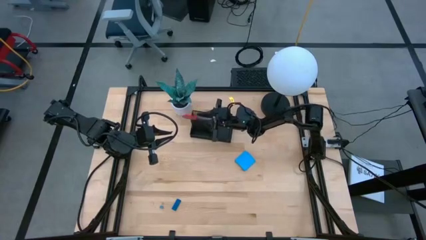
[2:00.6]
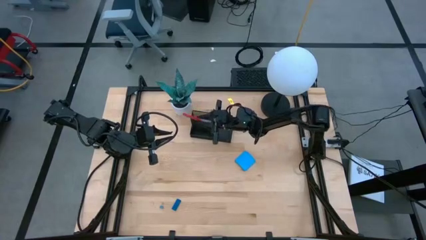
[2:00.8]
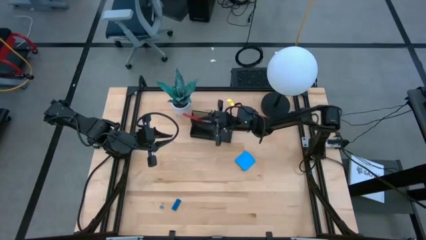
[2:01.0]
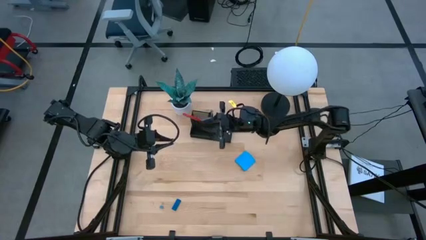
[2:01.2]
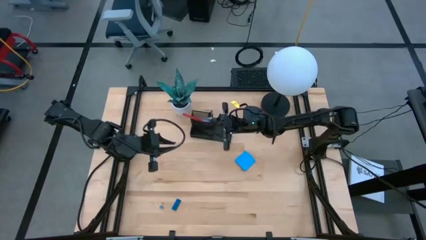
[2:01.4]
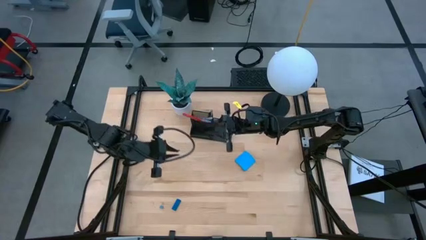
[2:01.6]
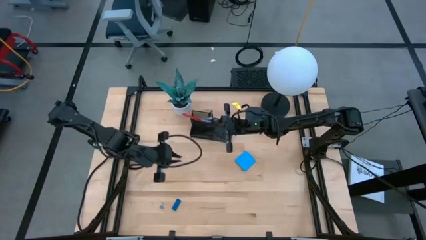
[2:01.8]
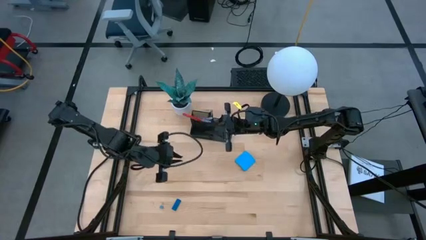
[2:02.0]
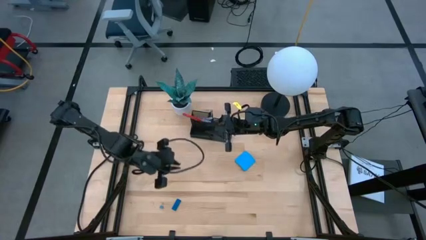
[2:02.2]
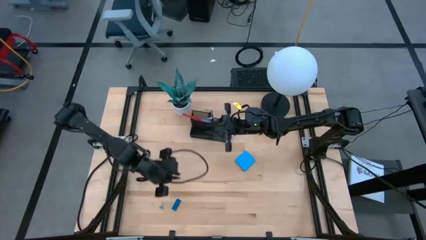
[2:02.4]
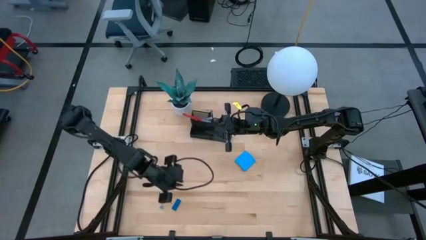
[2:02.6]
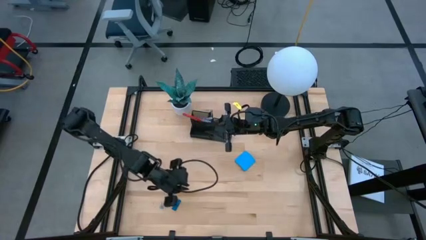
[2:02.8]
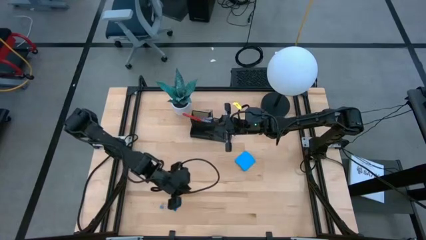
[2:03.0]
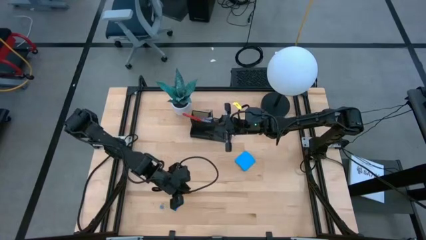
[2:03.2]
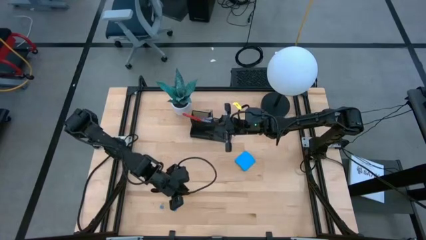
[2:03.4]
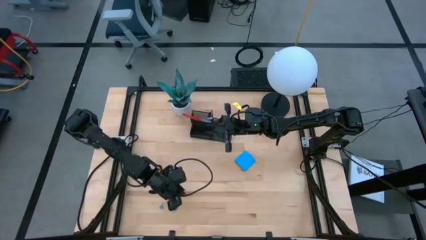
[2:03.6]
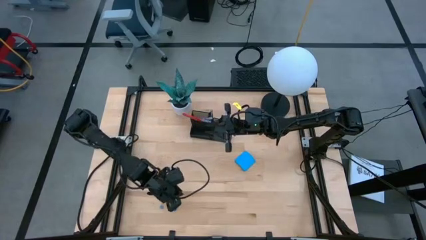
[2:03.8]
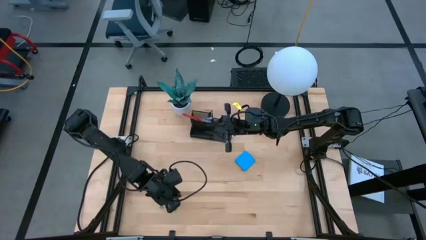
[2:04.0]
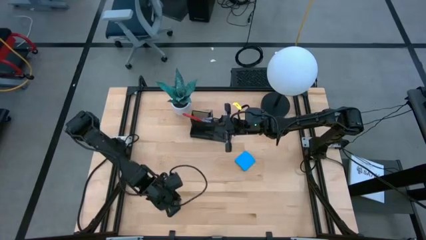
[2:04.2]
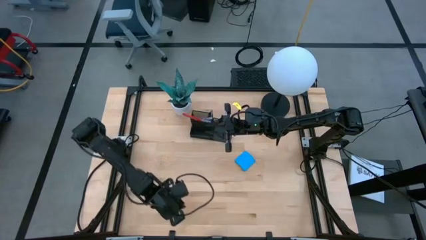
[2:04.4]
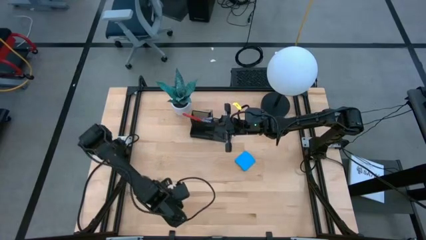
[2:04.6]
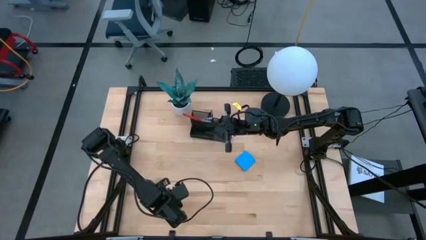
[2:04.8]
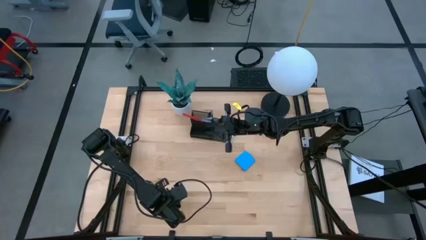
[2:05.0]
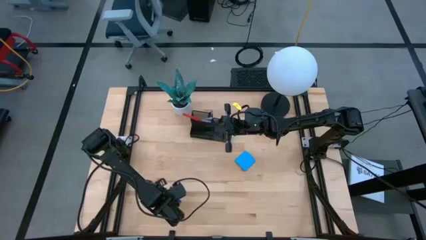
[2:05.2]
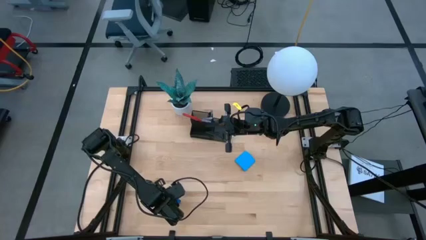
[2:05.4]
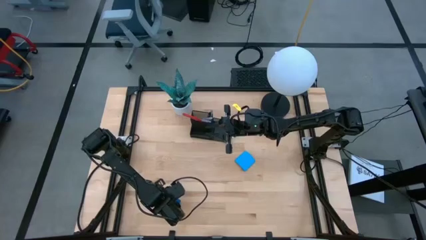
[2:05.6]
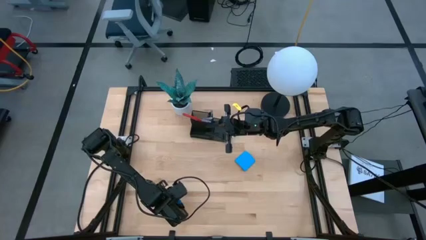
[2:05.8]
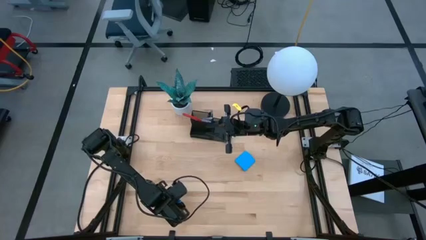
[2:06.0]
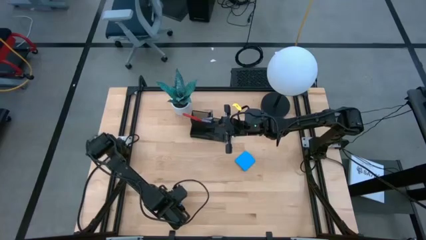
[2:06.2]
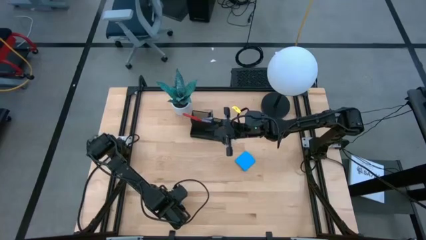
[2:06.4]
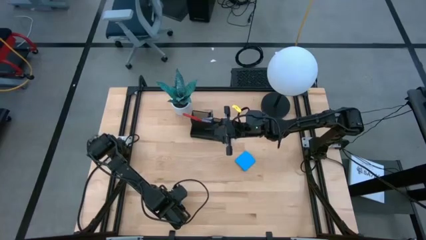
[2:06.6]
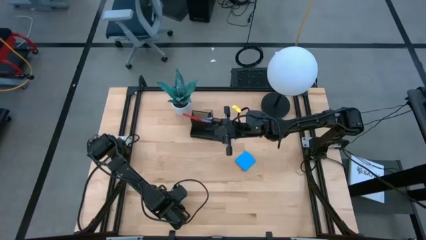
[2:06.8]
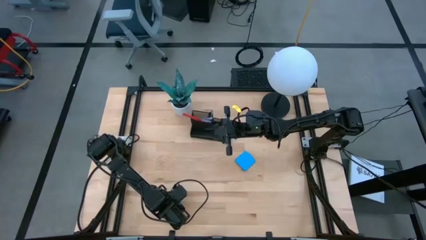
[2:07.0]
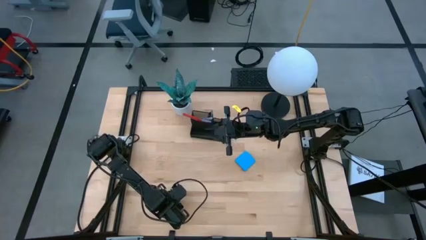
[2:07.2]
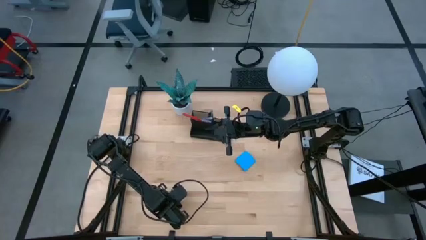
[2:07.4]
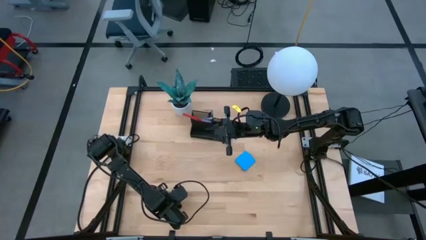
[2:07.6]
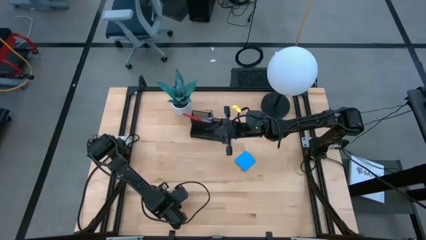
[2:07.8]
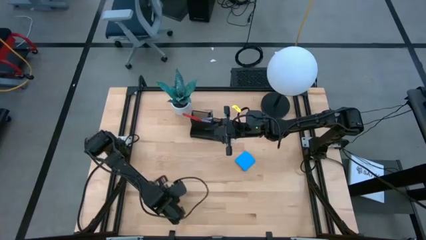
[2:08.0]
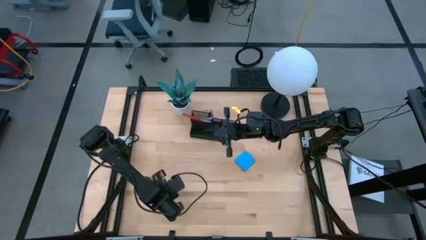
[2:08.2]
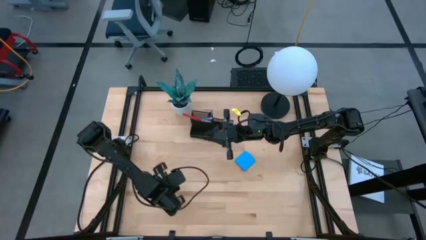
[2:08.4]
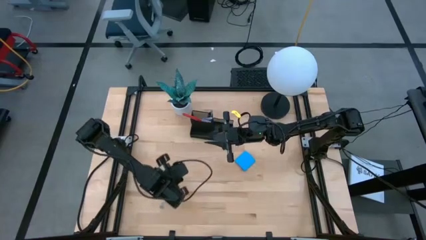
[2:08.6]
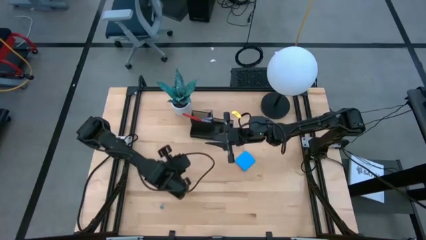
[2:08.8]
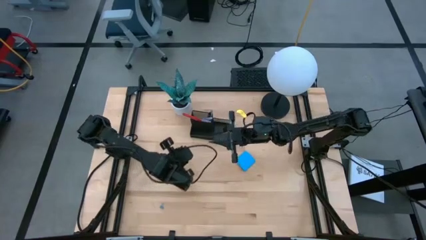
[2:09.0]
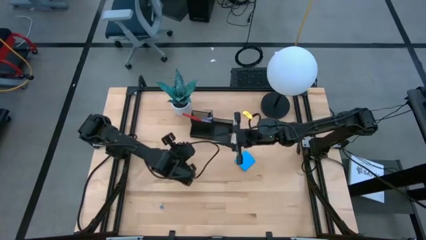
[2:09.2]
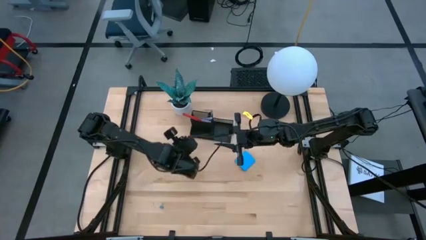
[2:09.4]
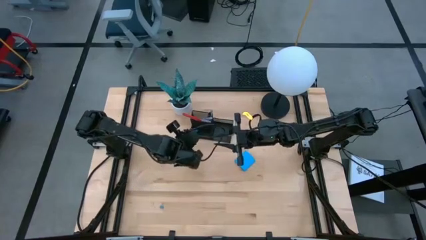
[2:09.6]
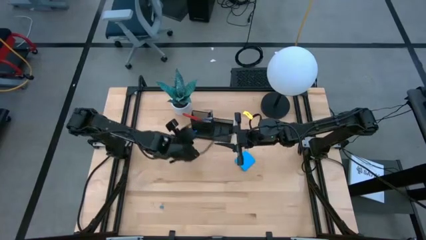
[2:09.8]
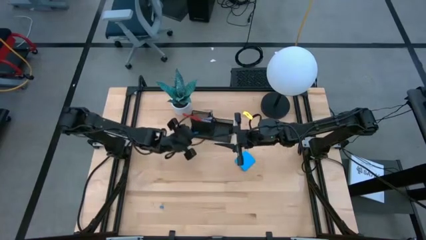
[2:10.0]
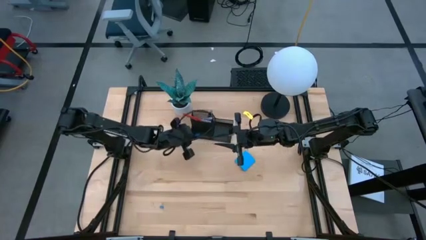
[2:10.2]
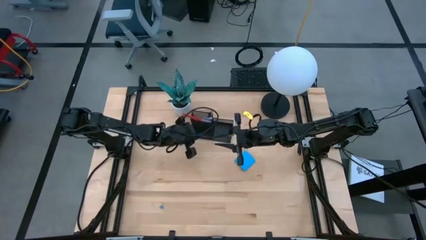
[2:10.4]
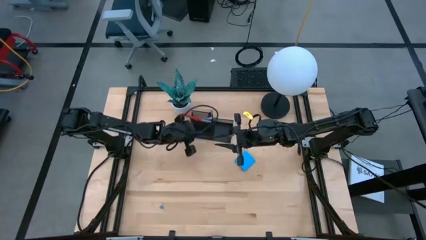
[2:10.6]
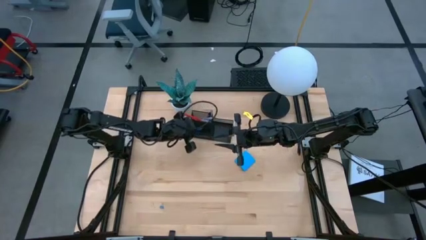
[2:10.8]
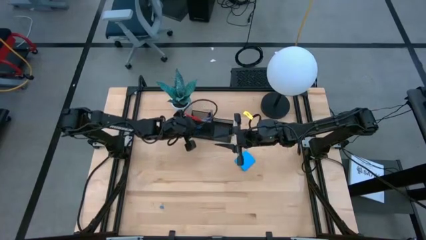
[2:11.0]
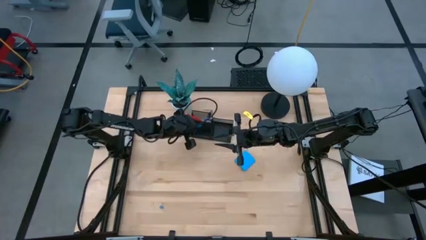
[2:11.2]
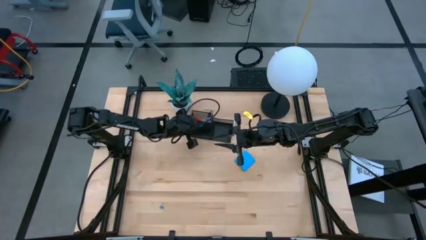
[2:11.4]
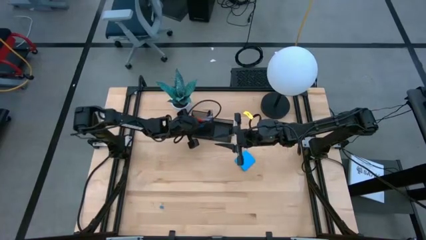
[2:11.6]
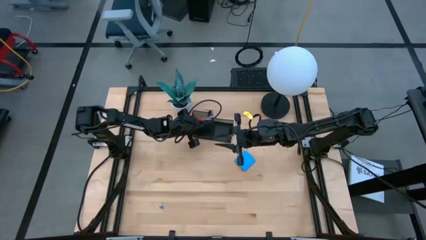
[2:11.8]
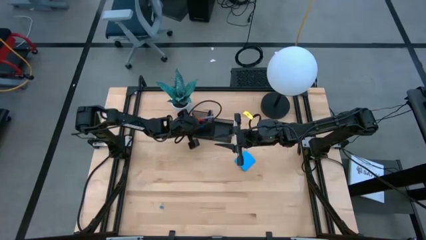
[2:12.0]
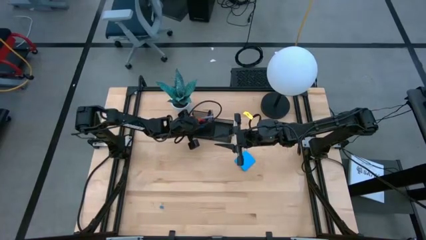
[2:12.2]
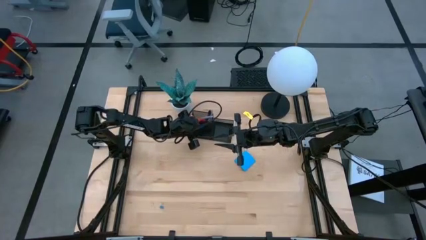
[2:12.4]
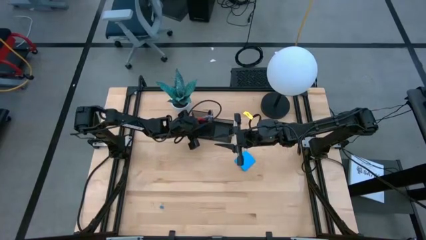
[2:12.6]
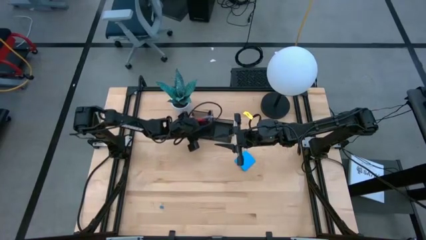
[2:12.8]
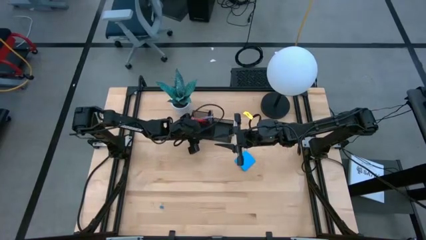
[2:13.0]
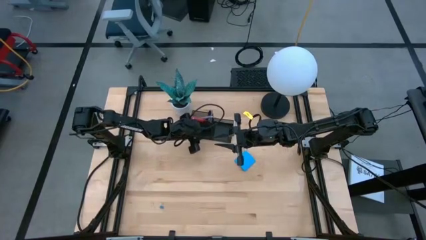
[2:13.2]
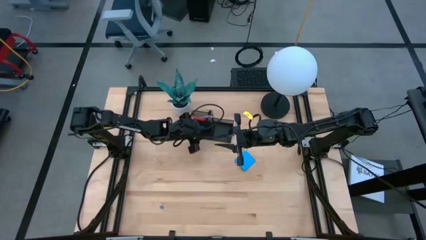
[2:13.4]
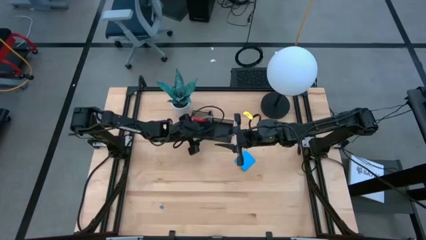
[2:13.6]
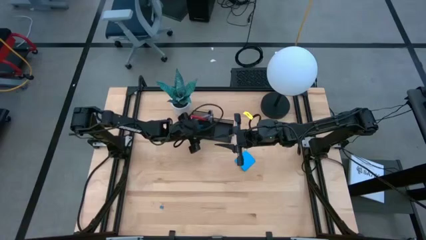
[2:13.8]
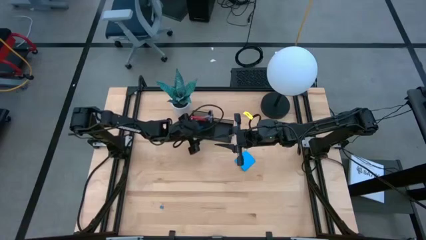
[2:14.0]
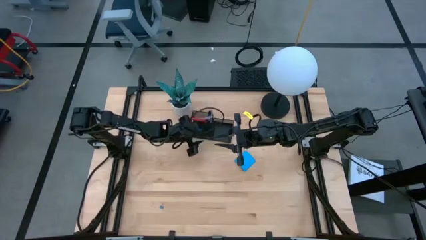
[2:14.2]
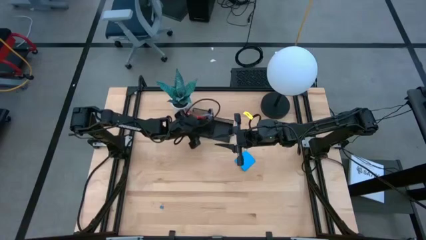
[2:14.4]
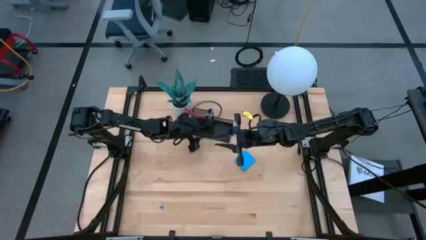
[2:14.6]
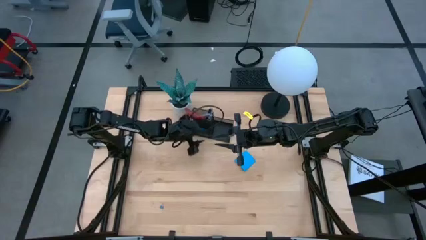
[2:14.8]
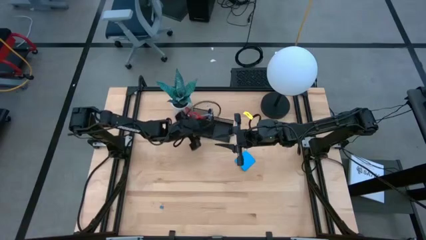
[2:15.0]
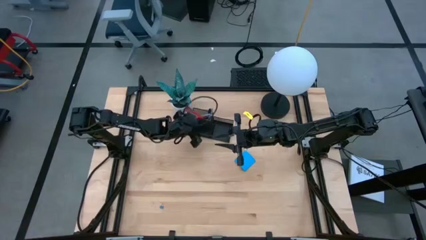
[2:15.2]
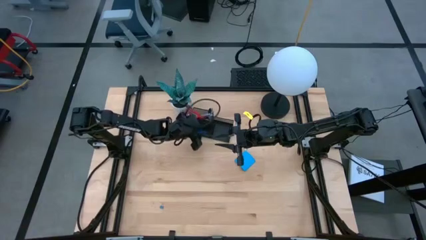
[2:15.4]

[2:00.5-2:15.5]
Task: Pick and place office supplies into organizer
Put the blue eraser into the black desk organizer

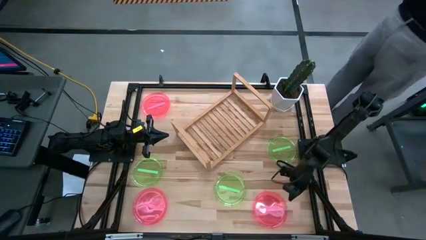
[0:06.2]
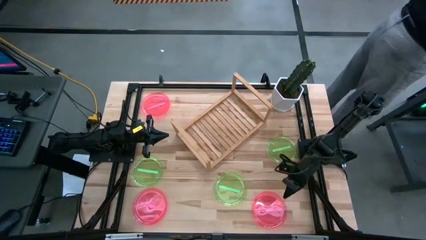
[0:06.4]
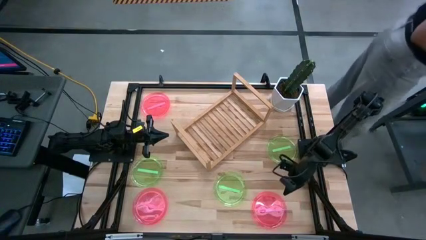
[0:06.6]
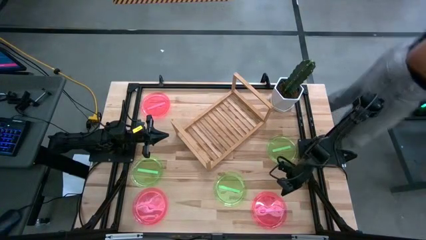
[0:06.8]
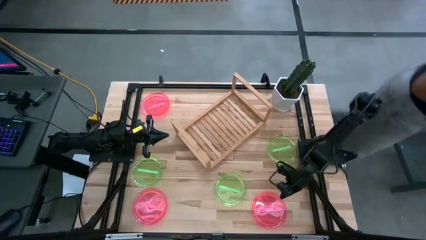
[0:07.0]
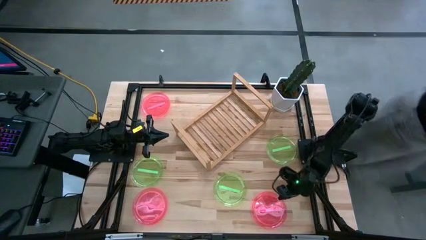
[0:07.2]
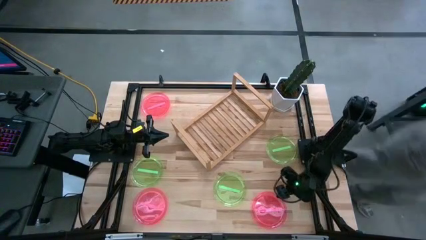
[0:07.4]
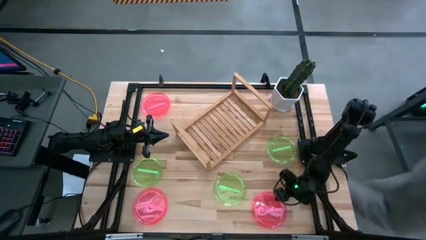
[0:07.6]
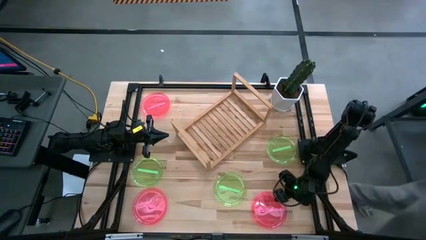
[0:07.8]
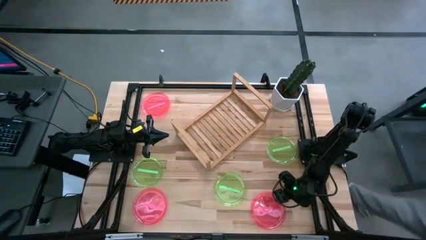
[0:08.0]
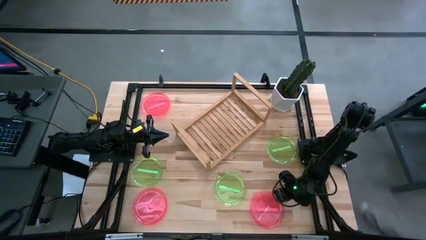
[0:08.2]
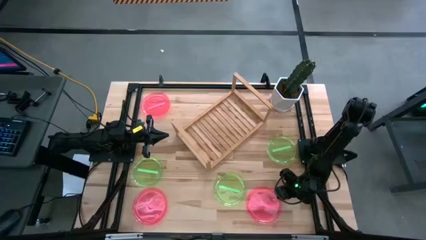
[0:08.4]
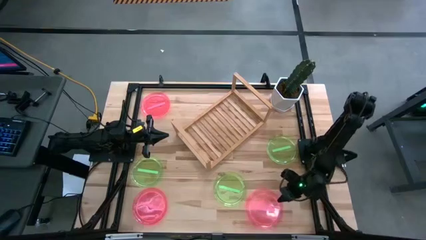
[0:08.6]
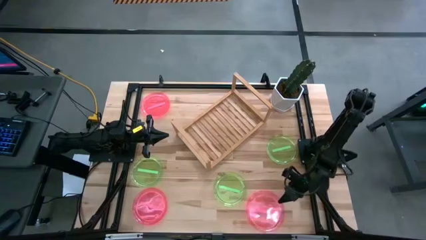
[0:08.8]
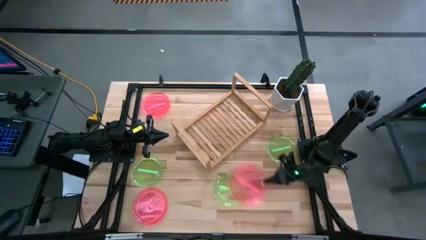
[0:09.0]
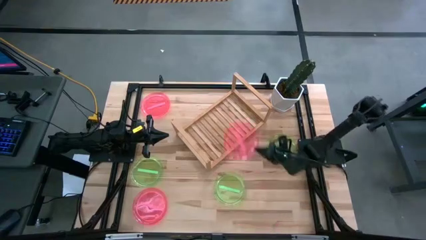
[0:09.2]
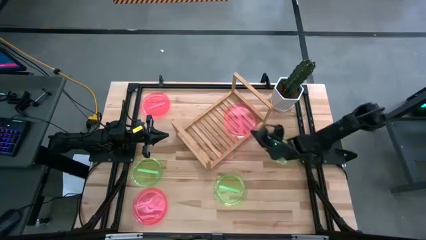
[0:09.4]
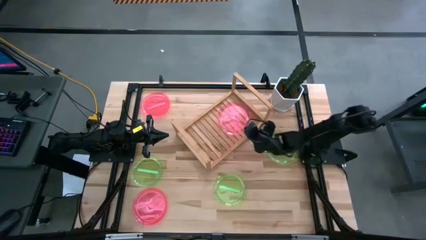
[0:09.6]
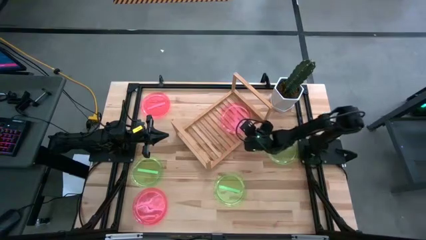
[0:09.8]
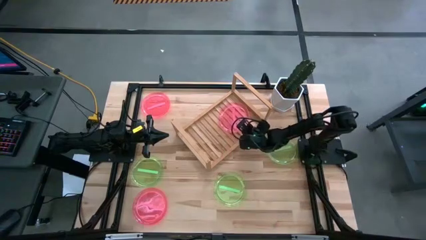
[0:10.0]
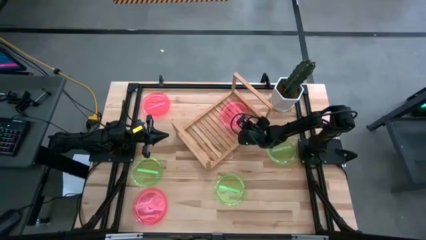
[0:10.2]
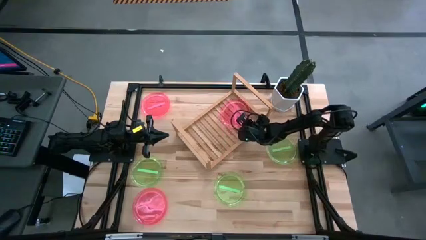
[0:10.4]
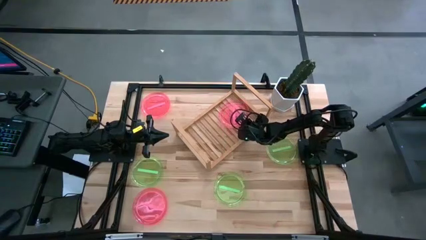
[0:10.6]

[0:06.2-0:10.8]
Task: Place and stack plates onto a shelf
Put the bottom right pink plate on the shelf
